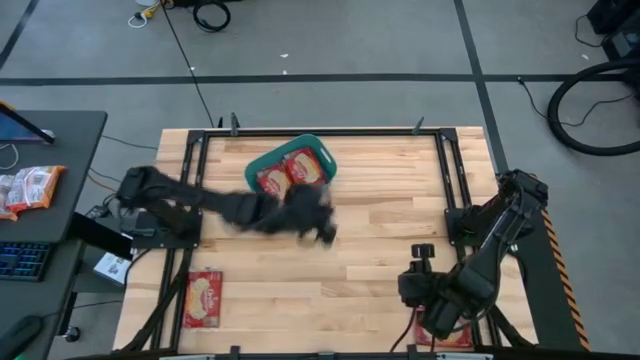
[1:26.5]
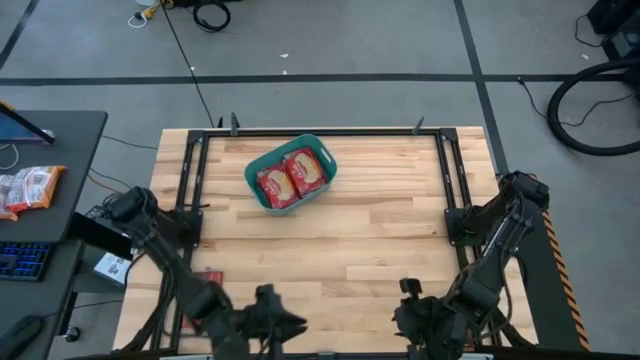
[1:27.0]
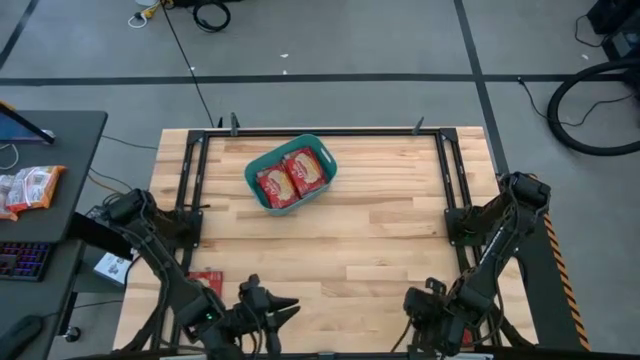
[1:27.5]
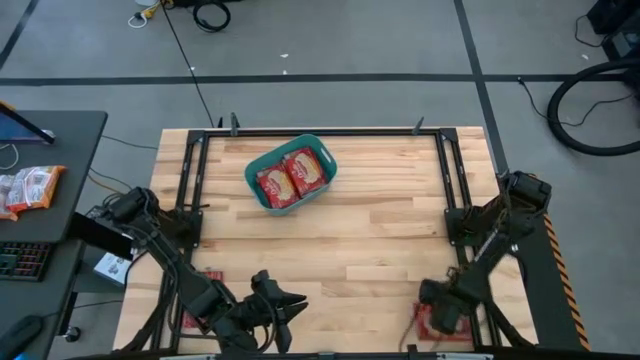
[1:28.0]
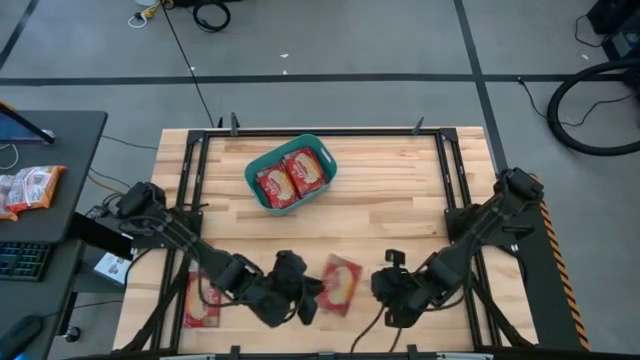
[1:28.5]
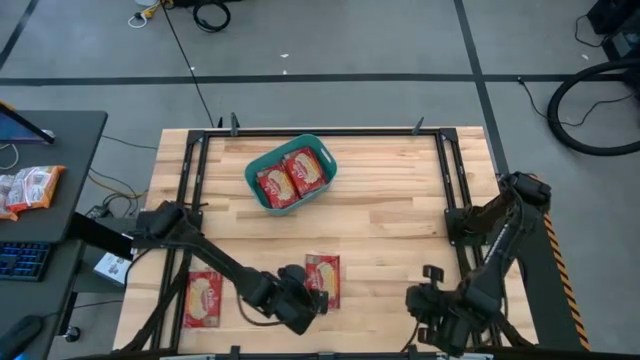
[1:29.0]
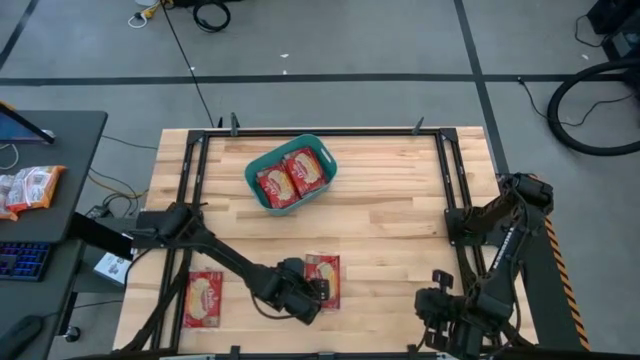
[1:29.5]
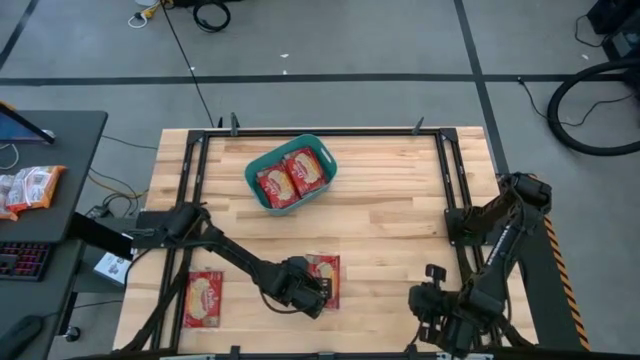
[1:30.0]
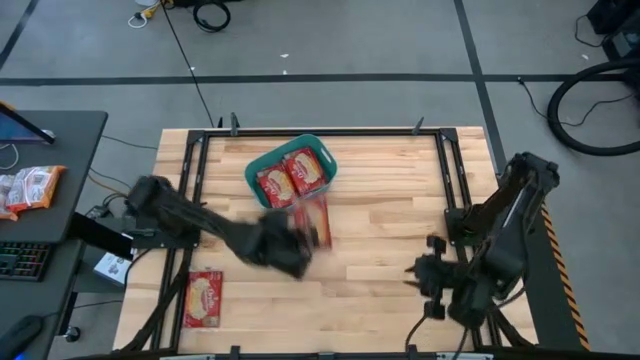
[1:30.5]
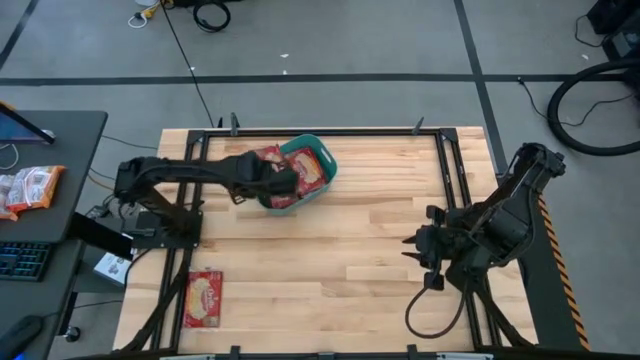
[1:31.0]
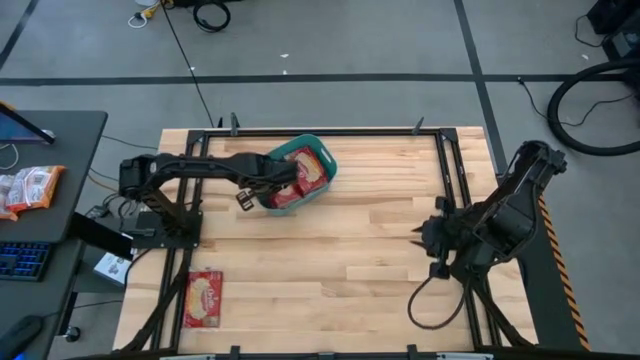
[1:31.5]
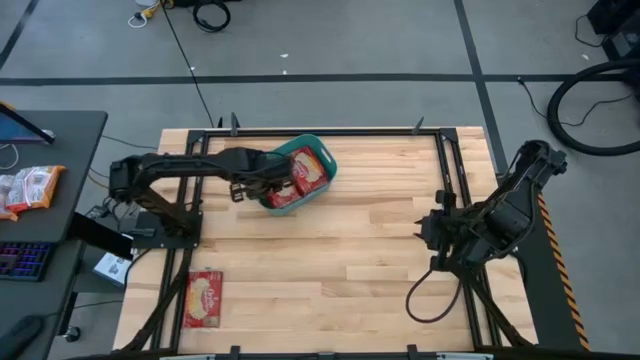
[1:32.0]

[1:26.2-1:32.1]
Task: Sort popcorn bags into baskets
Put the popcorn bag into the green bin

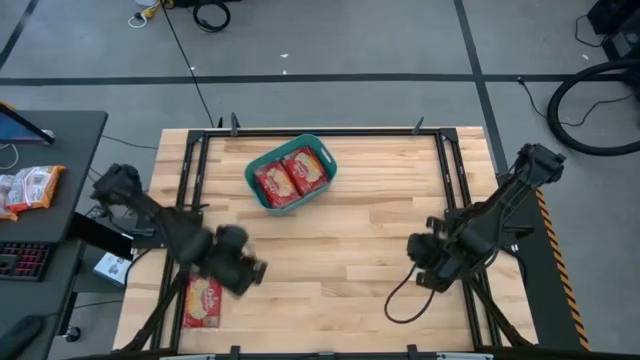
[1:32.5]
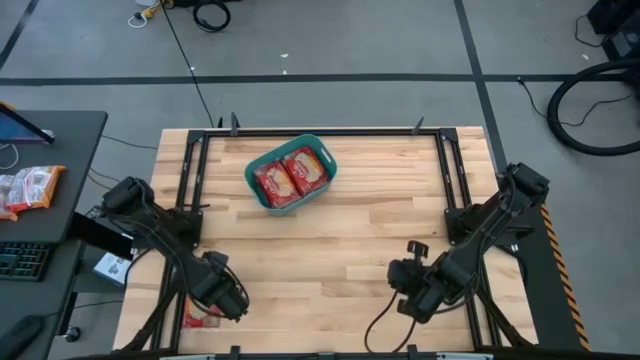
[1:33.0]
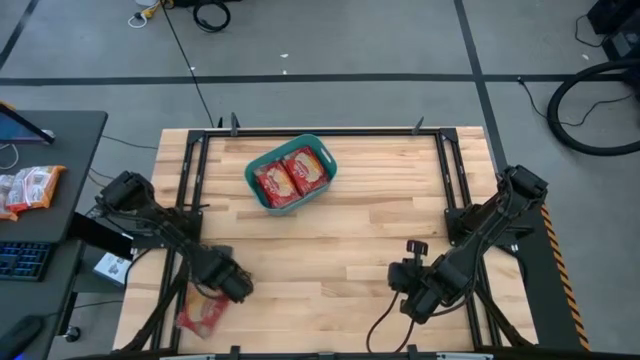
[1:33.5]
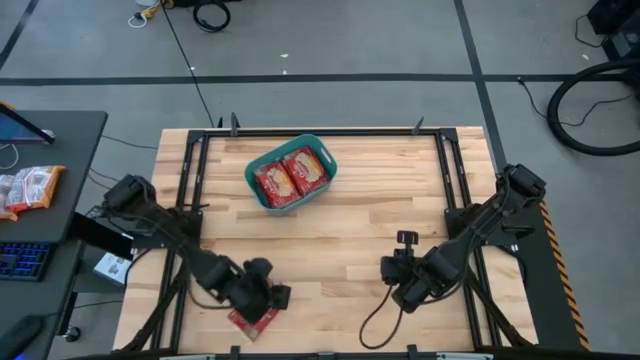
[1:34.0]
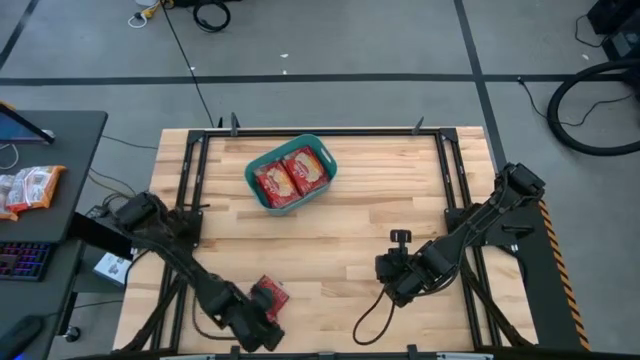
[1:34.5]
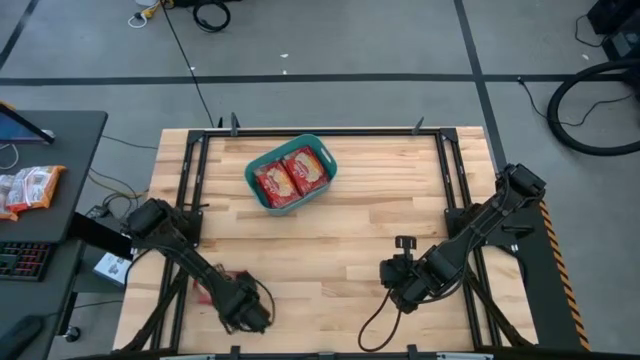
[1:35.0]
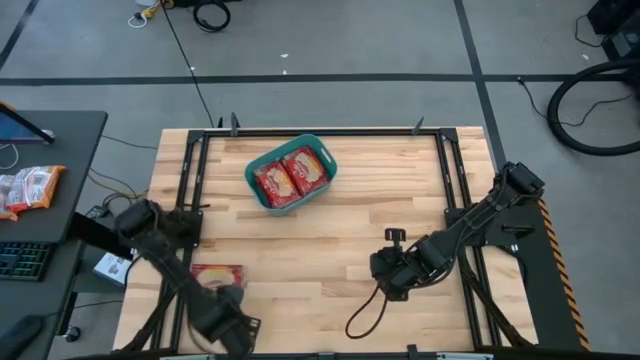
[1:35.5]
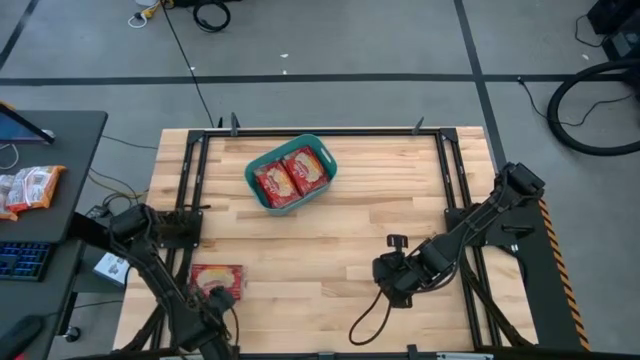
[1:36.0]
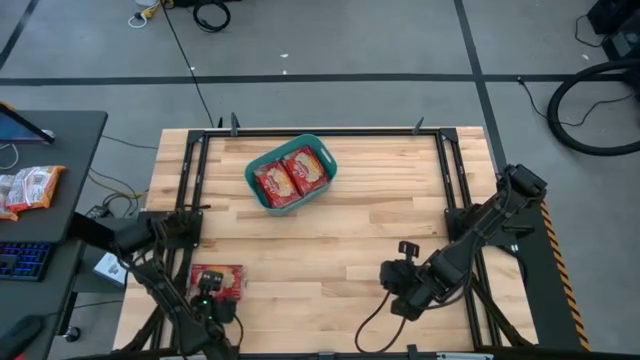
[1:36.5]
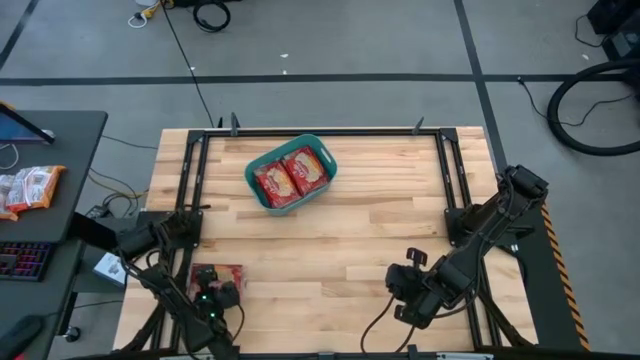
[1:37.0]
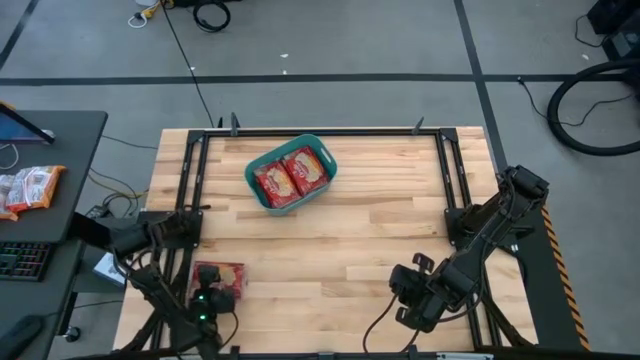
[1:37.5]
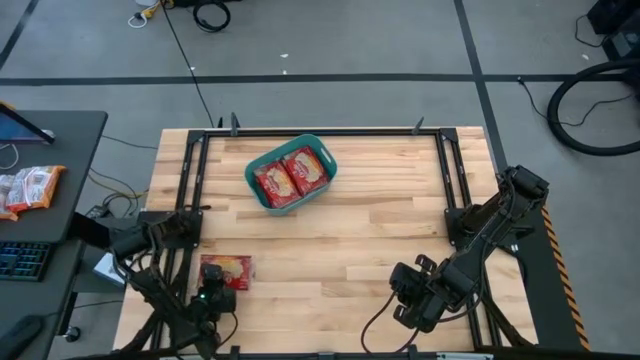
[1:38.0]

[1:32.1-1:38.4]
Put the popcorn bag into the green bin

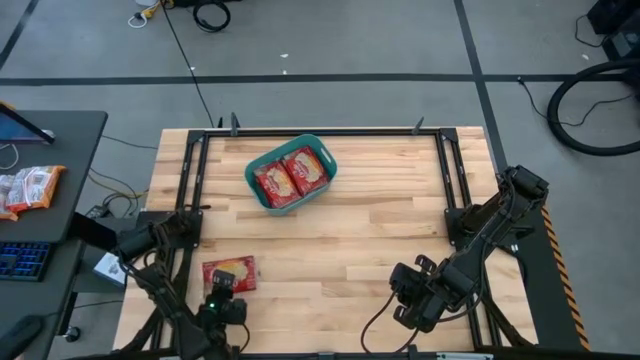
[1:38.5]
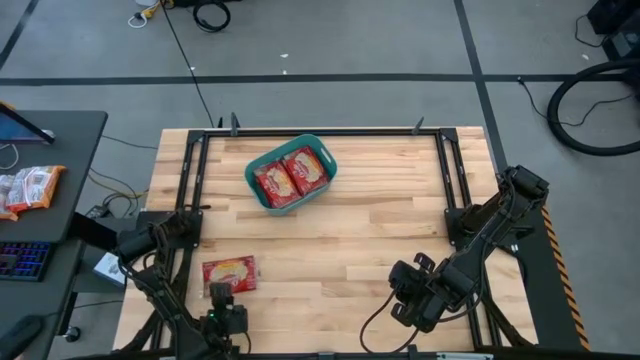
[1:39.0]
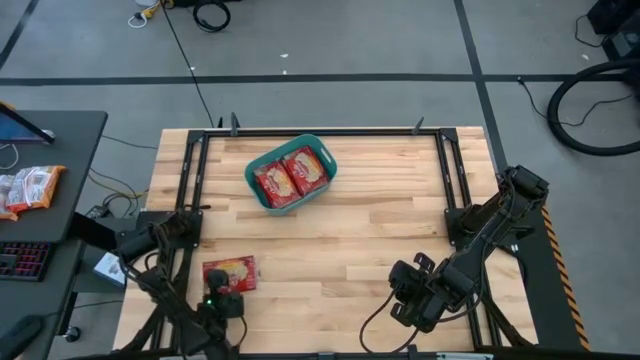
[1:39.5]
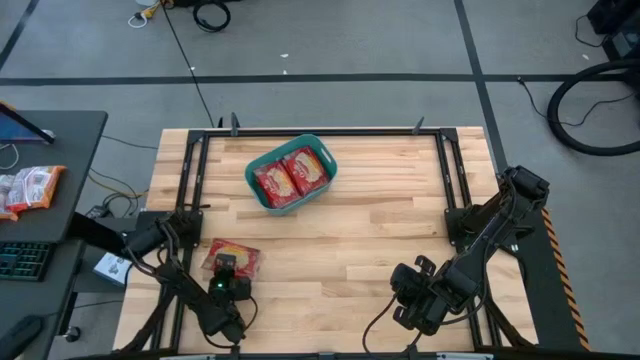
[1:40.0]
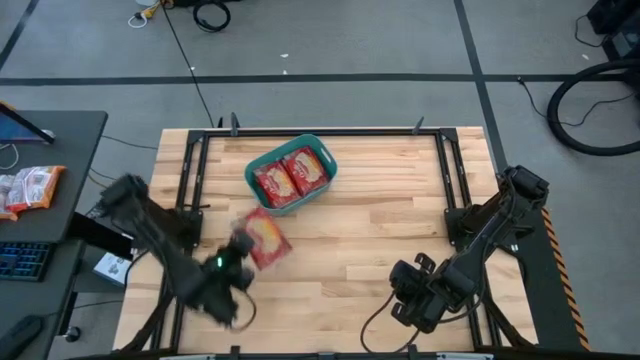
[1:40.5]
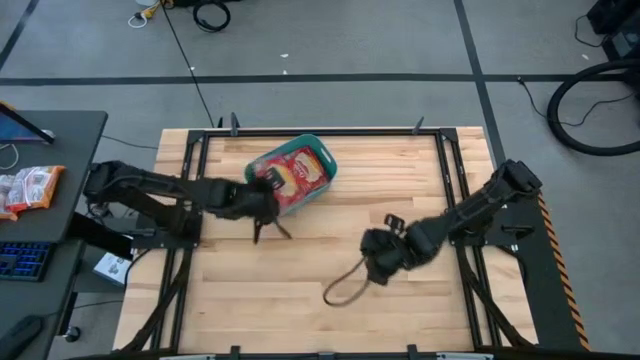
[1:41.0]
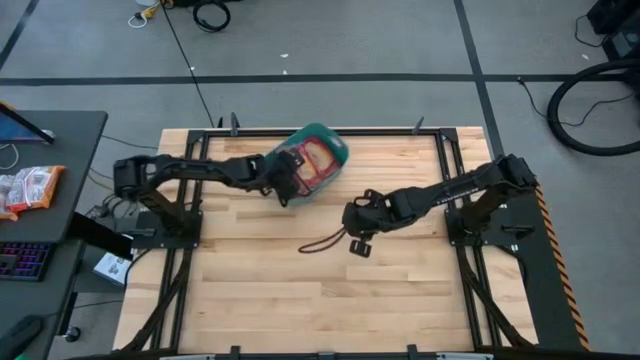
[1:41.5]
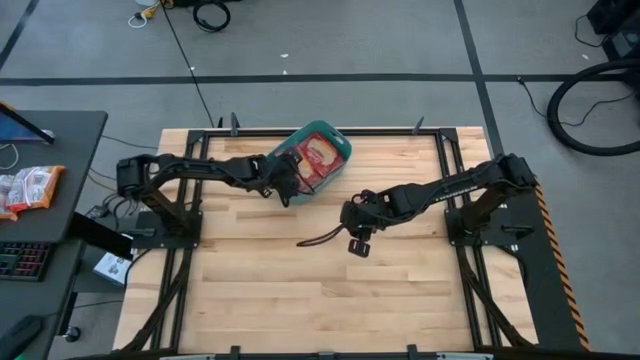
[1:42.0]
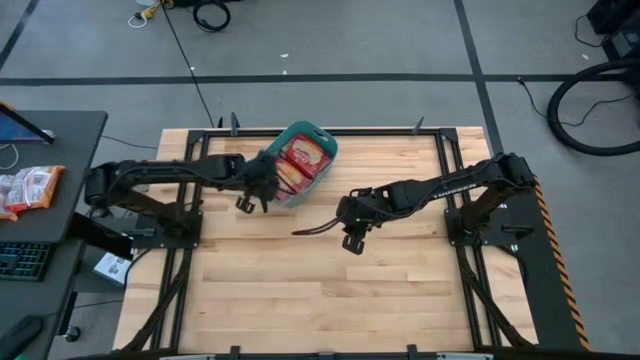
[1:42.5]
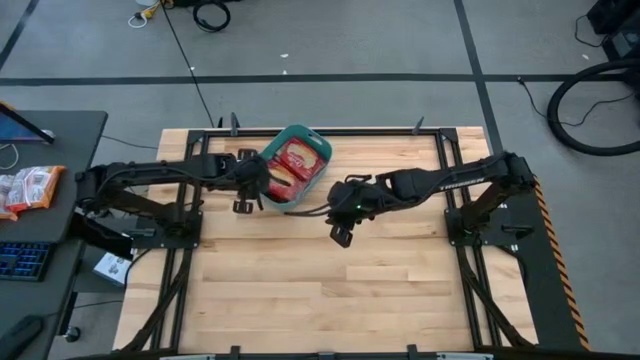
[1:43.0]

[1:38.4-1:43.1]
Put the popcorn bag into the green bin

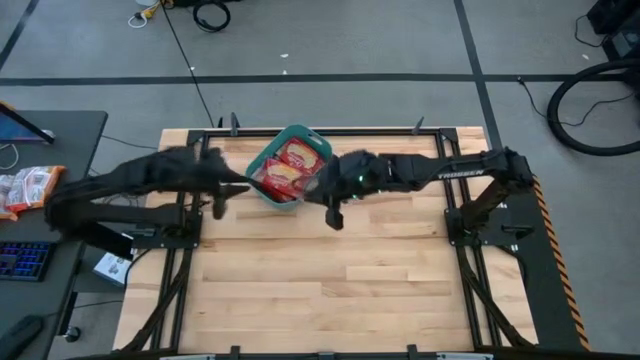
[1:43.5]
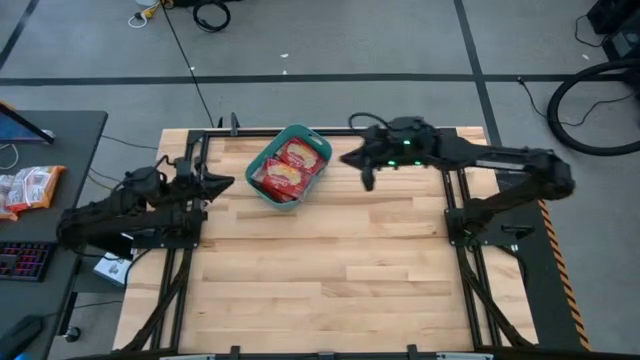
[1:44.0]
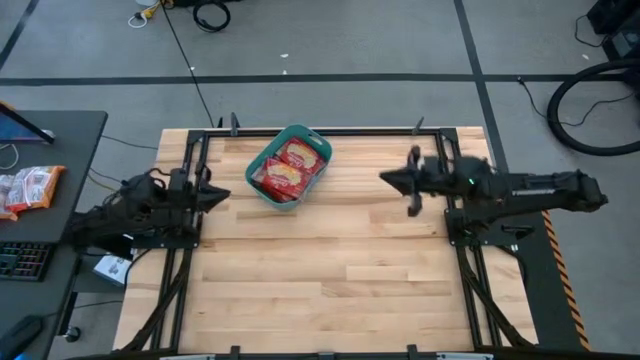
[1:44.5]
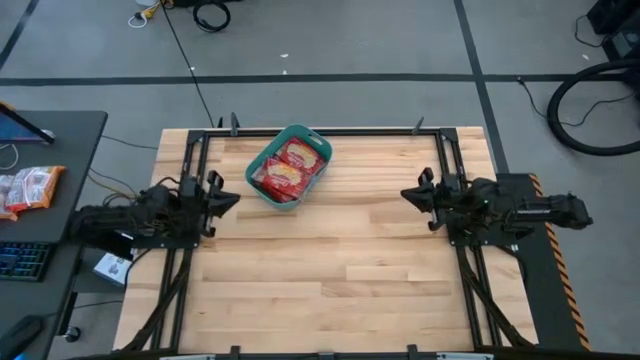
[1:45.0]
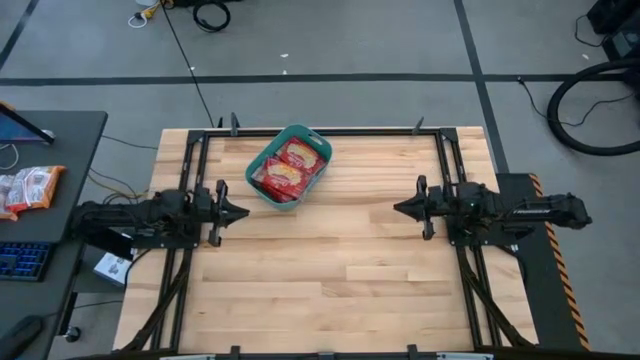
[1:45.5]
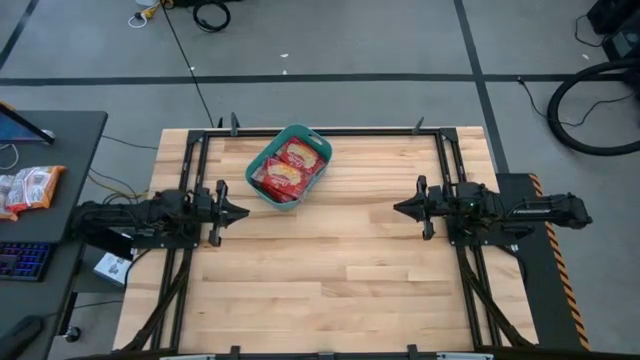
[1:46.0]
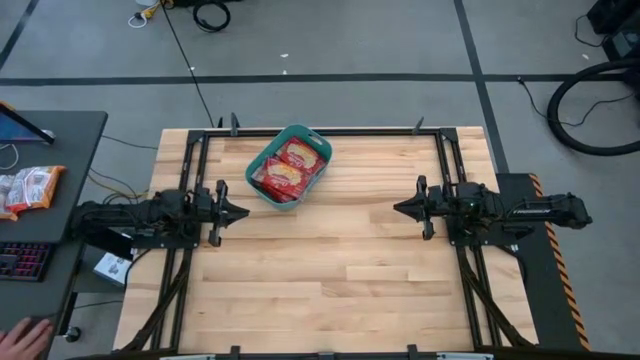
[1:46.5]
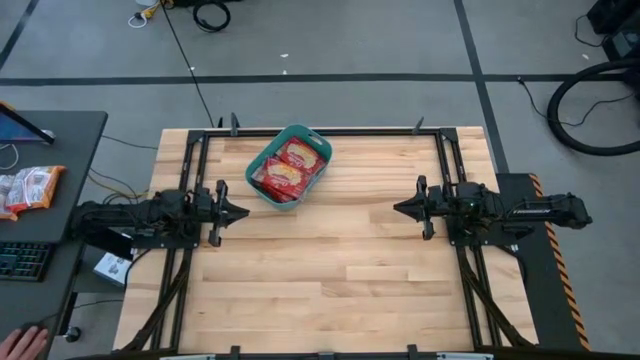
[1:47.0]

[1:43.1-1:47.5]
Return to Home Position

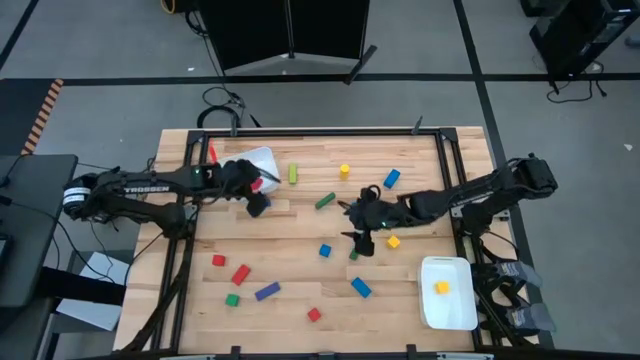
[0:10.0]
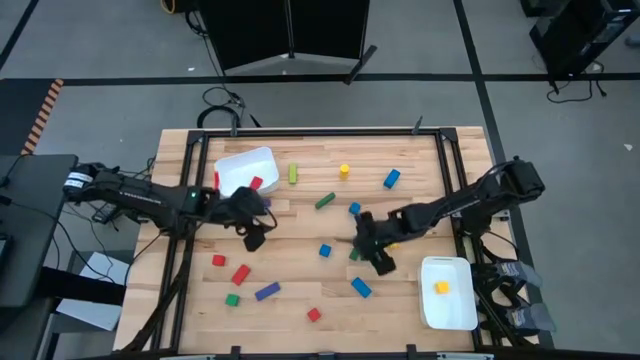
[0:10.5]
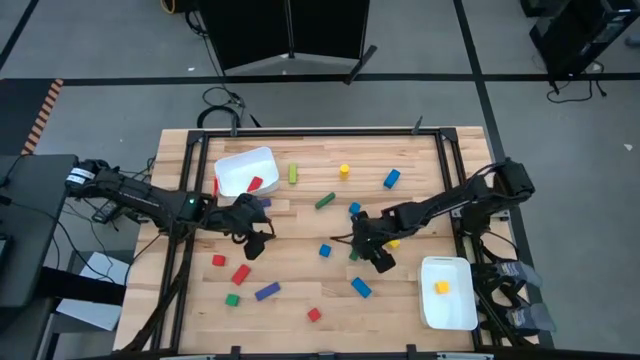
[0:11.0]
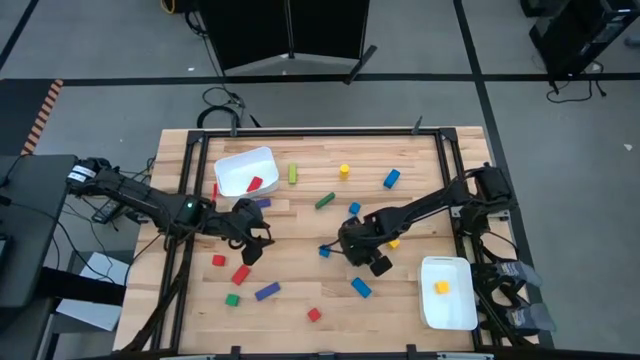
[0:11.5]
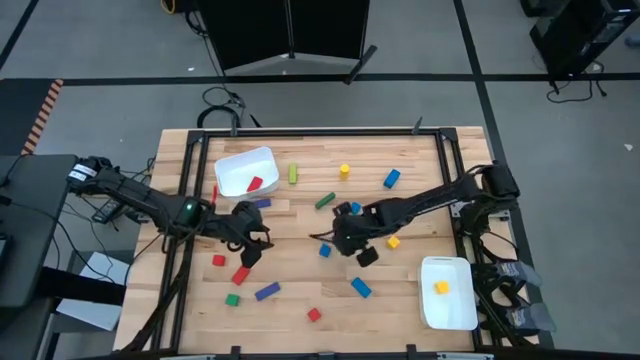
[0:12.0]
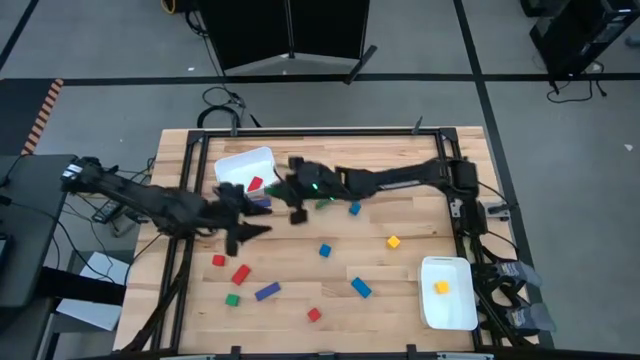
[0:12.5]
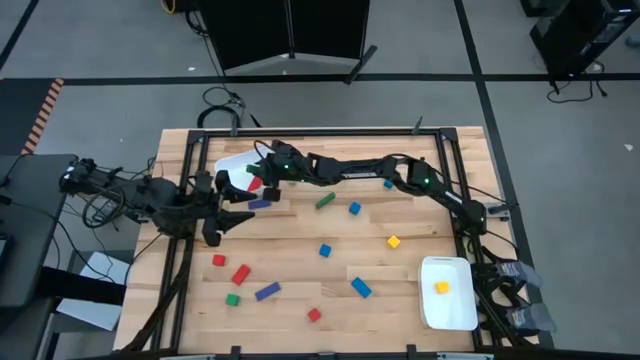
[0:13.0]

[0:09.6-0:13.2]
Task: Sort blocks by size
Put the large green block into the top white bin
